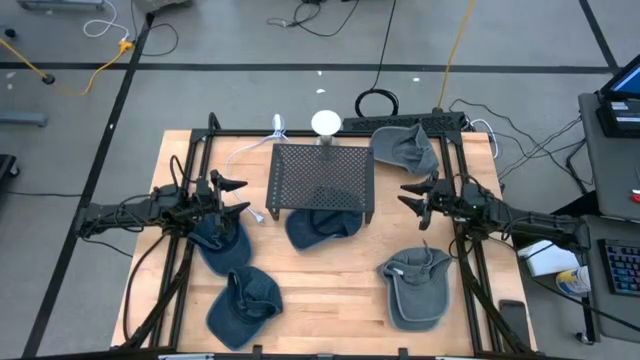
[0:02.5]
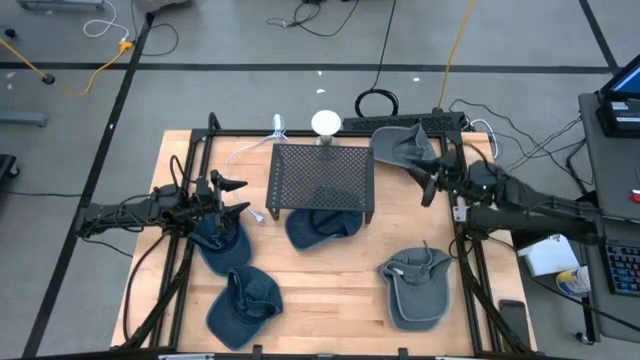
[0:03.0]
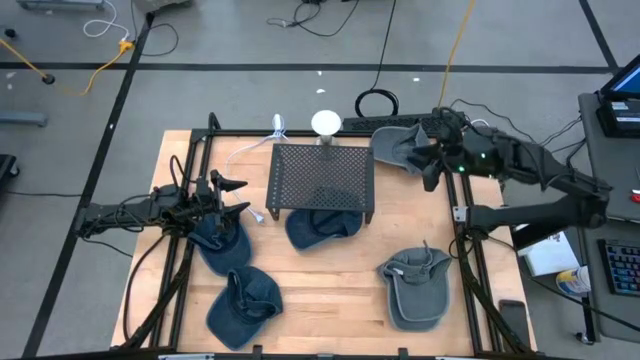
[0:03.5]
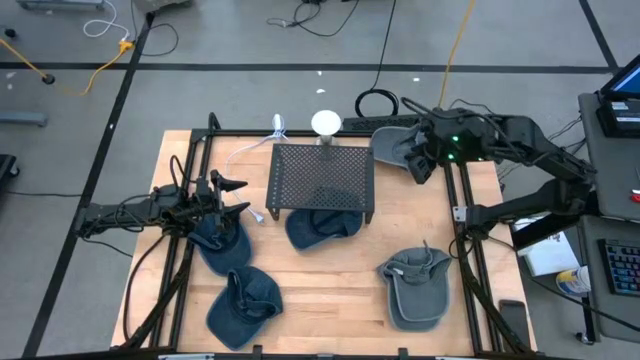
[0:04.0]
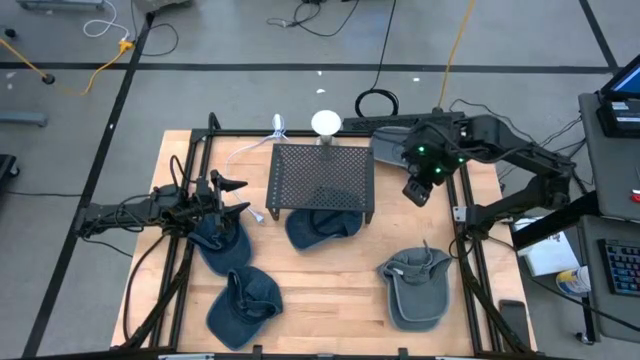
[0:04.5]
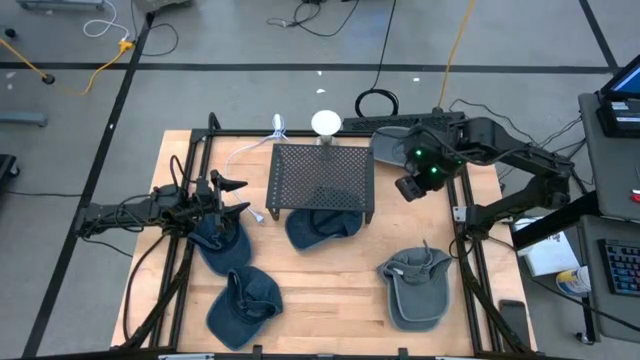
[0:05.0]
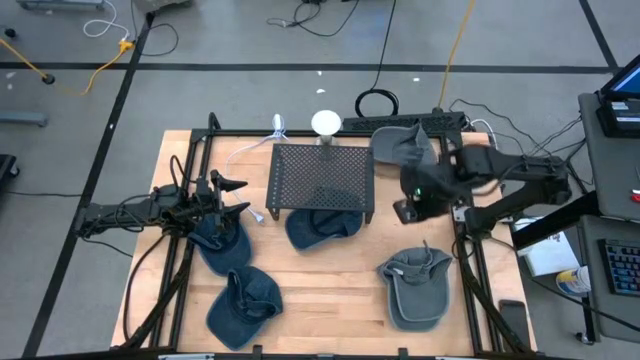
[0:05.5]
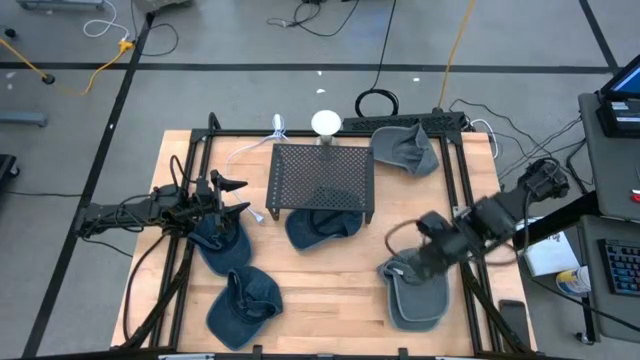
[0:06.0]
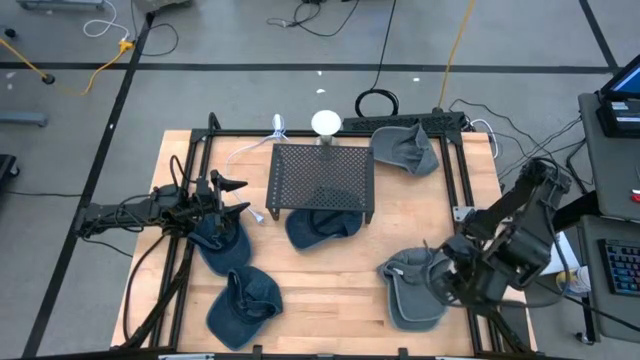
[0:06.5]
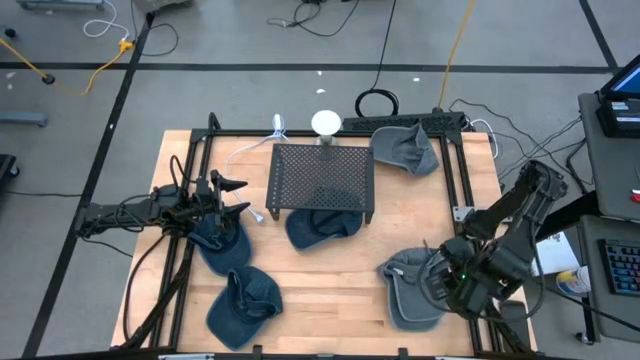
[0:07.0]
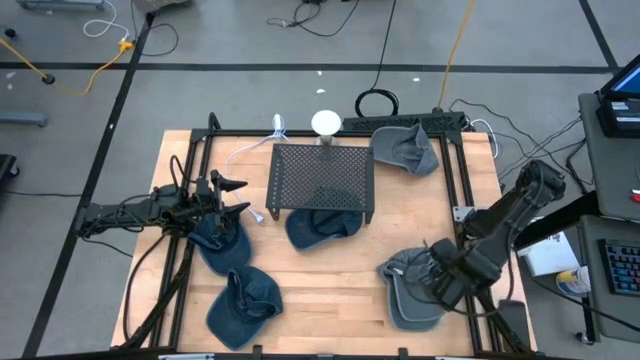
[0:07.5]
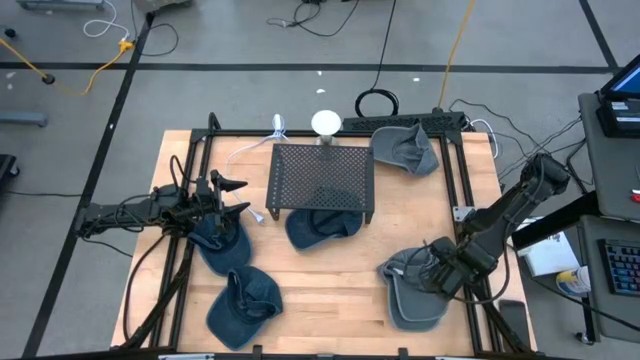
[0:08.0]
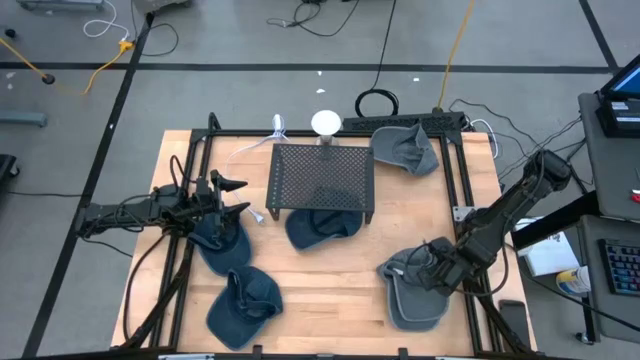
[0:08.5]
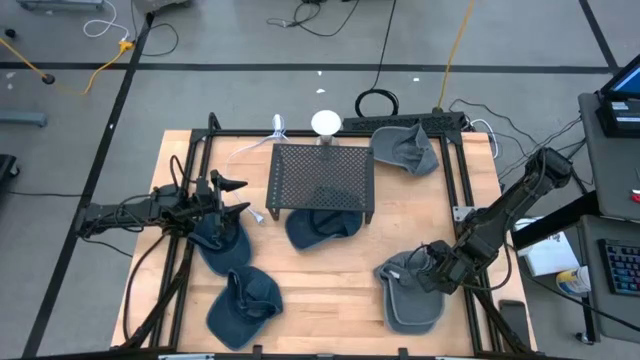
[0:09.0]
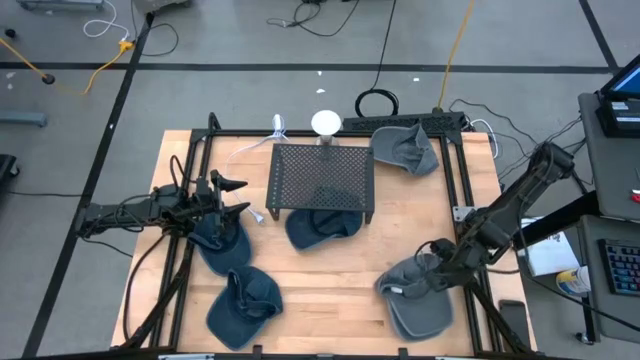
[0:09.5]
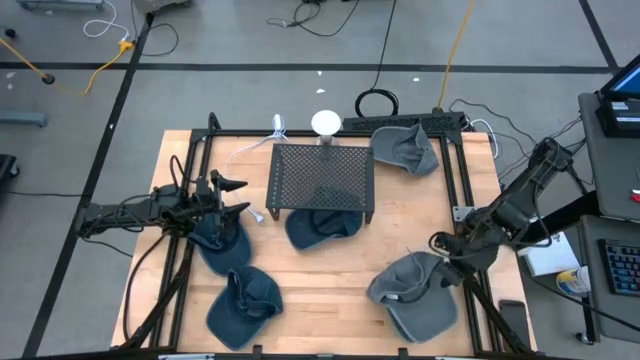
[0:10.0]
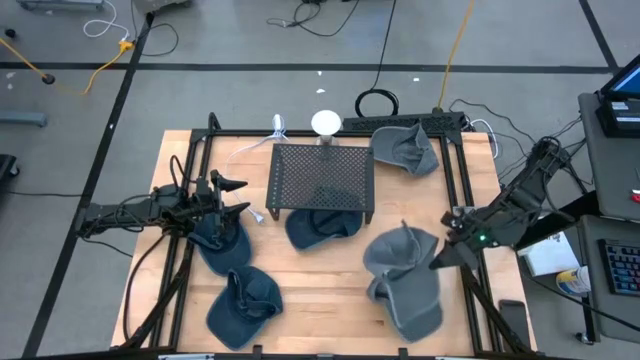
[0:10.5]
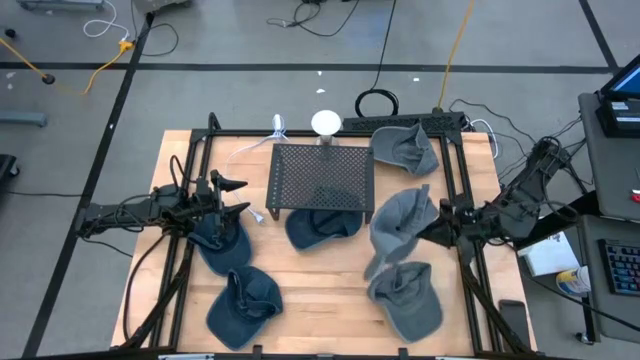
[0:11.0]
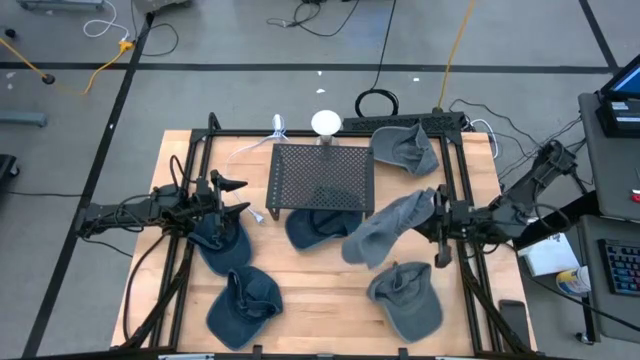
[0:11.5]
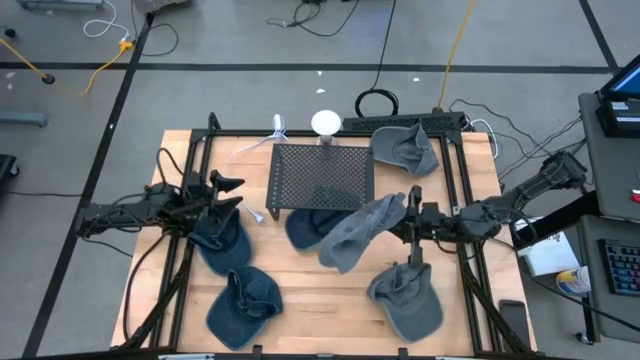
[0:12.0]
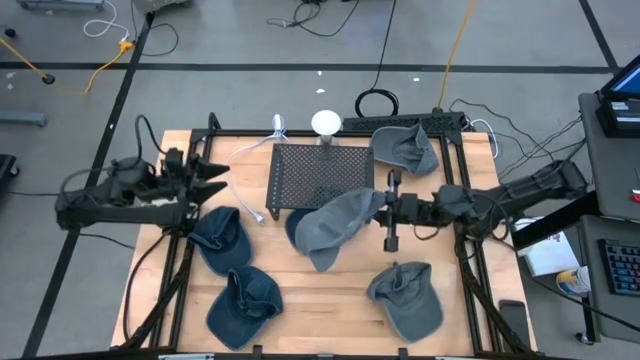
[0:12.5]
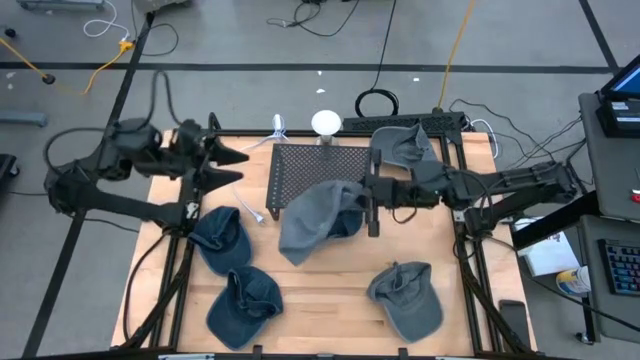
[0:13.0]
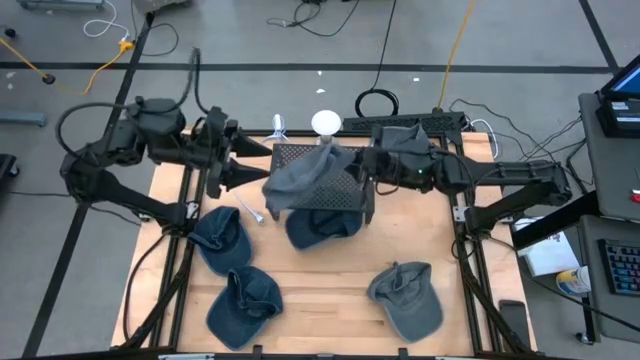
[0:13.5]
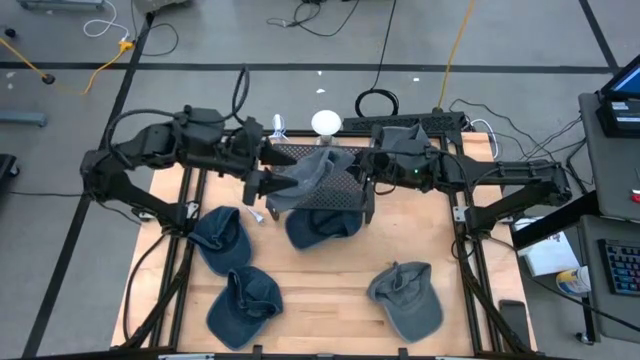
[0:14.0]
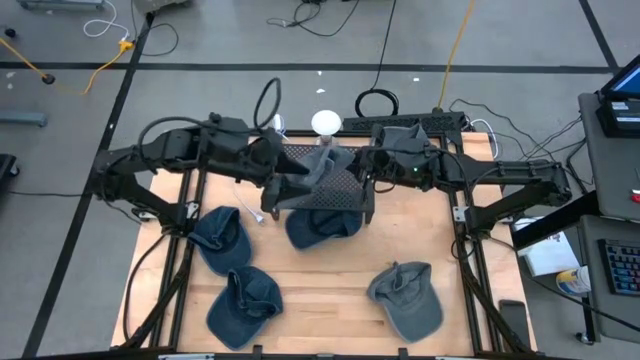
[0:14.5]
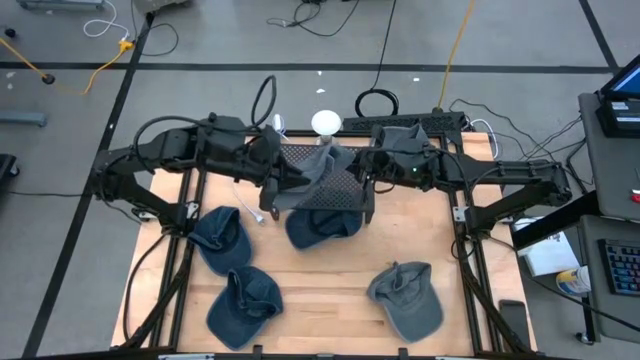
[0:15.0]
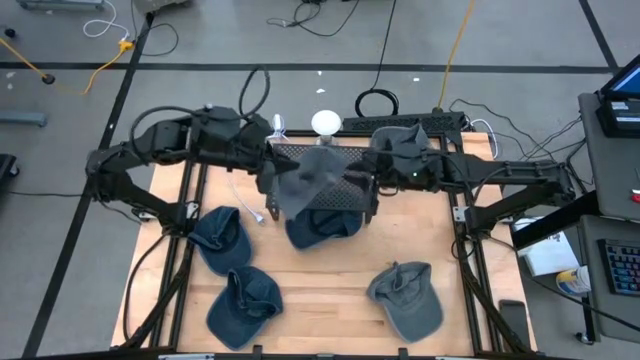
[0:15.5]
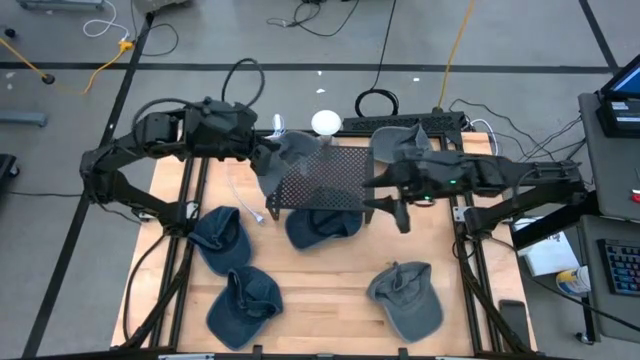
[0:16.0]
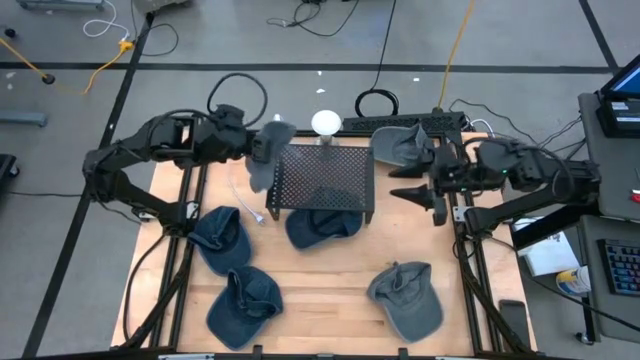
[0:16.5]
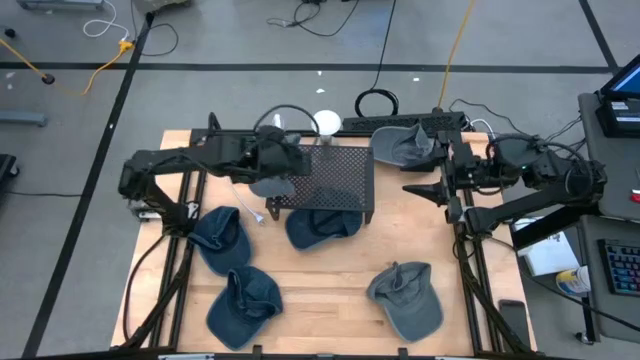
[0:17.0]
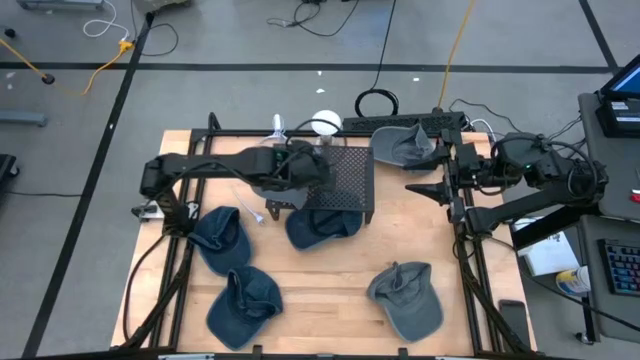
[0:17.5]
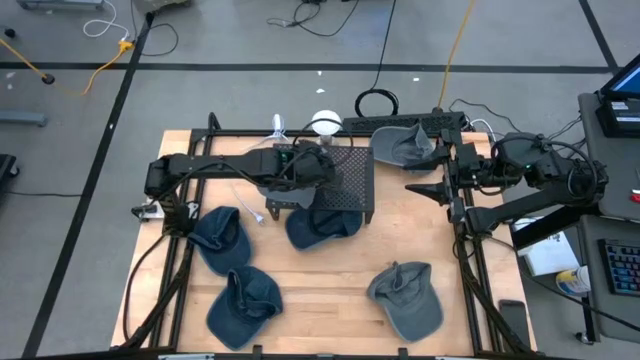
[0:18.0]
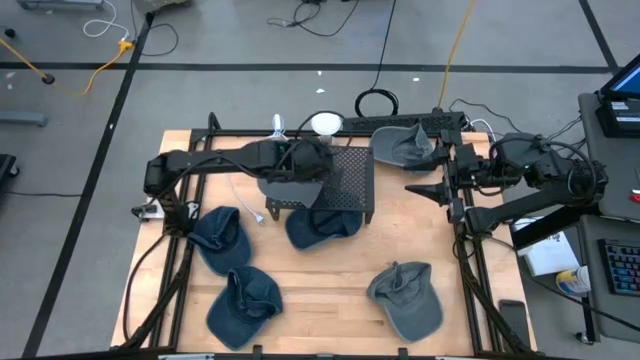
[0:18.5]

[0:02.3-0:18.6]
Task: Pick & Place hat
Put the bottom gray cap on the shelf
